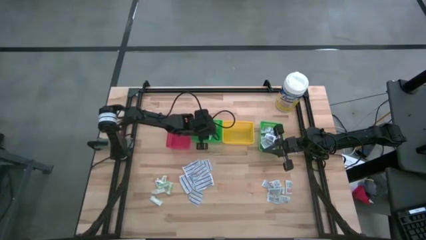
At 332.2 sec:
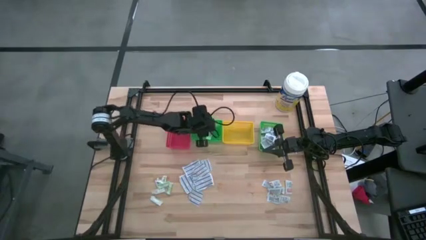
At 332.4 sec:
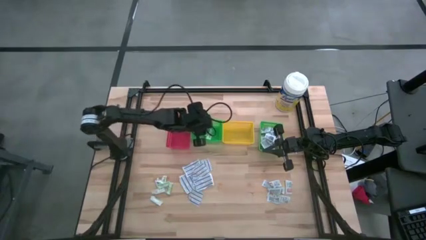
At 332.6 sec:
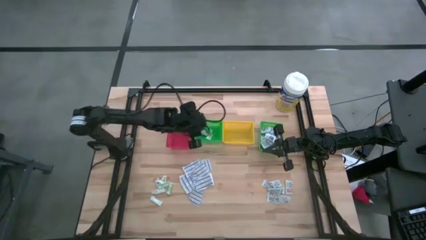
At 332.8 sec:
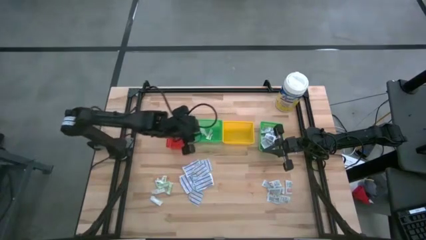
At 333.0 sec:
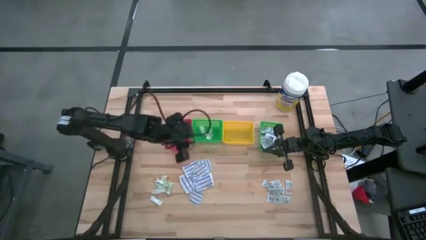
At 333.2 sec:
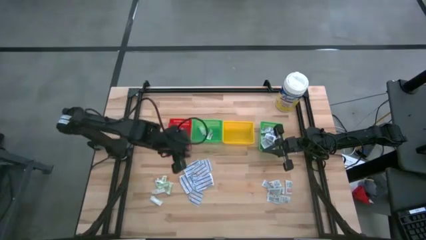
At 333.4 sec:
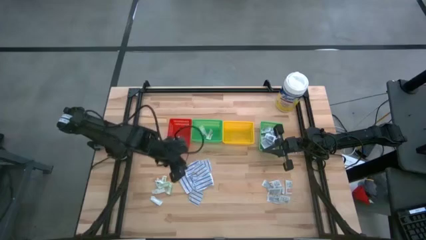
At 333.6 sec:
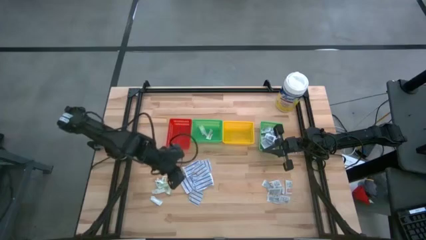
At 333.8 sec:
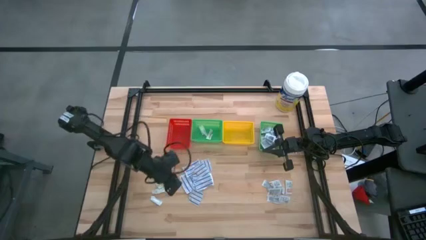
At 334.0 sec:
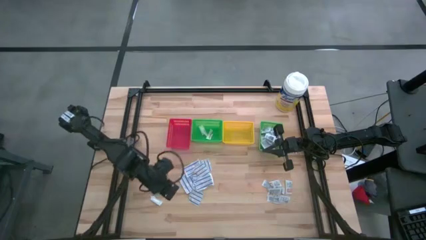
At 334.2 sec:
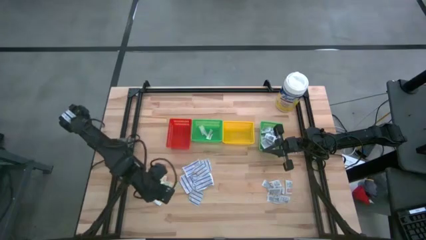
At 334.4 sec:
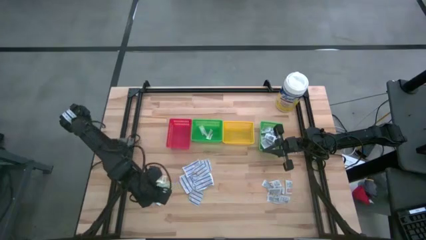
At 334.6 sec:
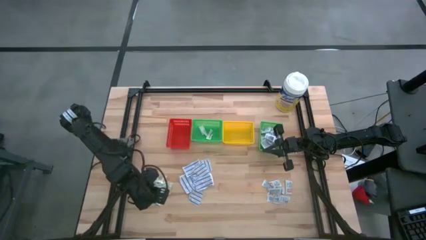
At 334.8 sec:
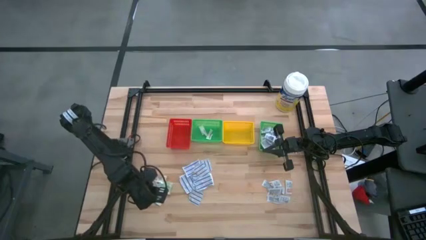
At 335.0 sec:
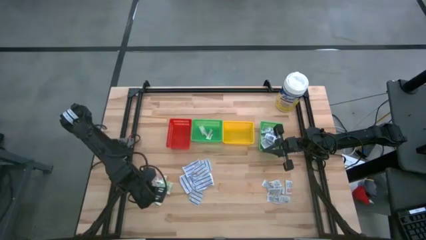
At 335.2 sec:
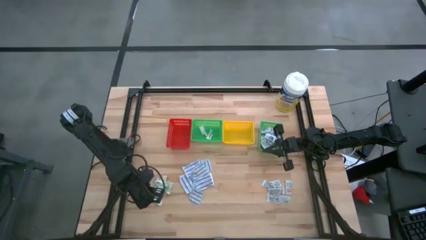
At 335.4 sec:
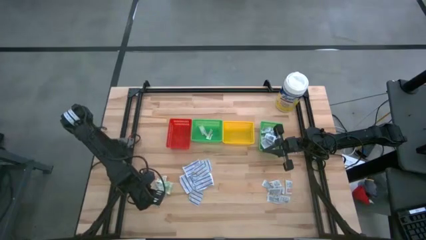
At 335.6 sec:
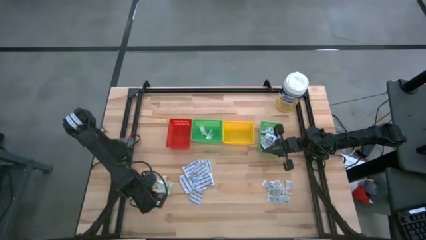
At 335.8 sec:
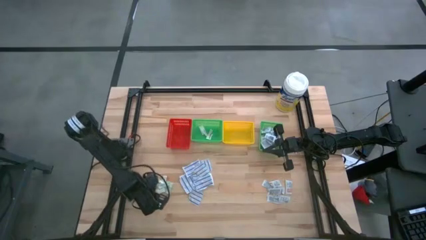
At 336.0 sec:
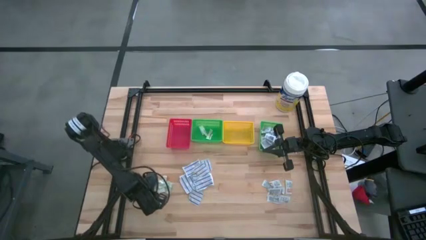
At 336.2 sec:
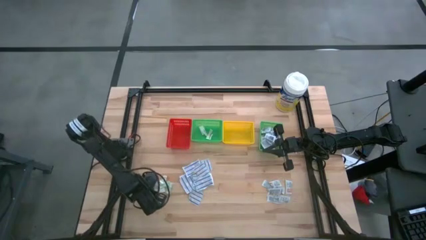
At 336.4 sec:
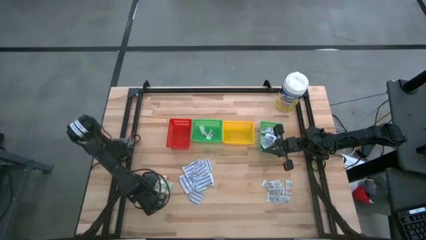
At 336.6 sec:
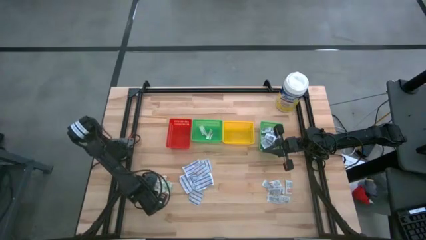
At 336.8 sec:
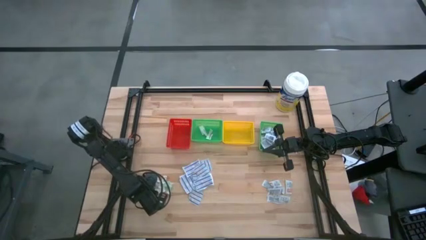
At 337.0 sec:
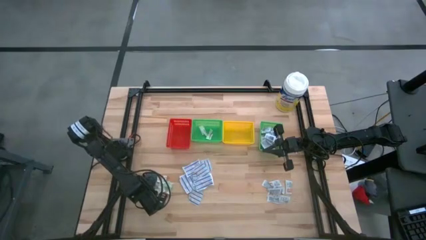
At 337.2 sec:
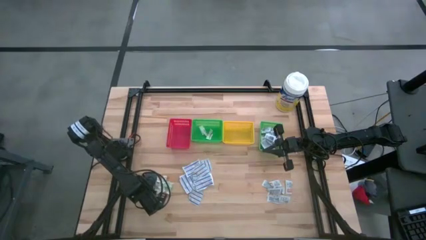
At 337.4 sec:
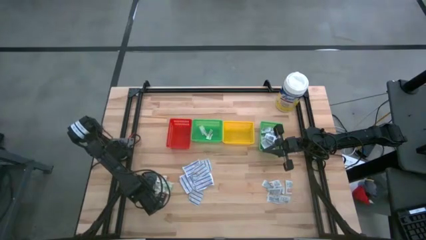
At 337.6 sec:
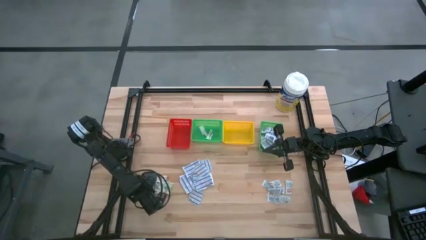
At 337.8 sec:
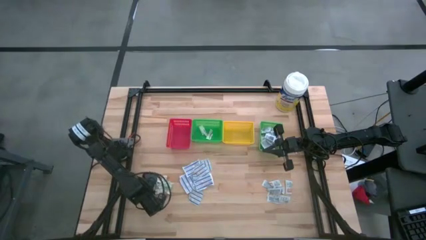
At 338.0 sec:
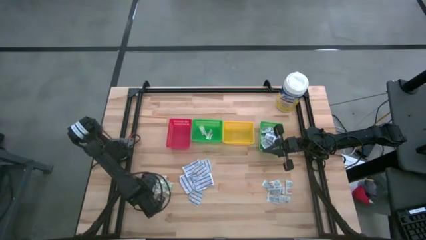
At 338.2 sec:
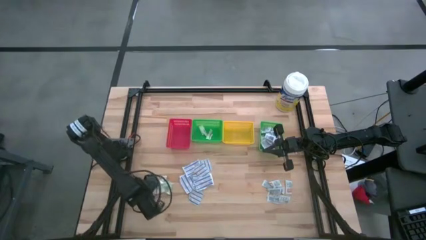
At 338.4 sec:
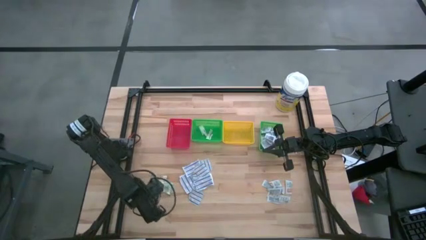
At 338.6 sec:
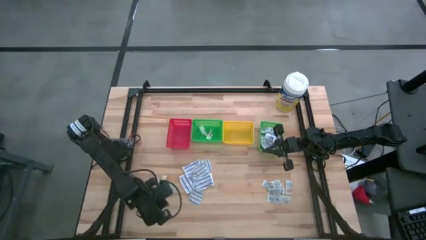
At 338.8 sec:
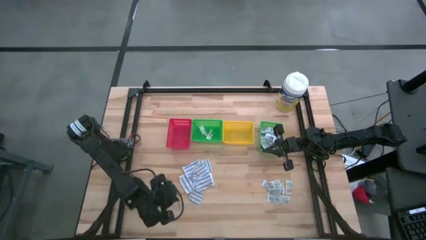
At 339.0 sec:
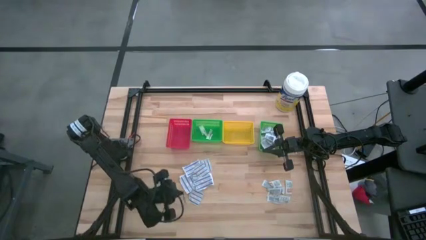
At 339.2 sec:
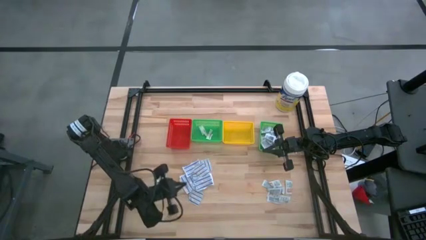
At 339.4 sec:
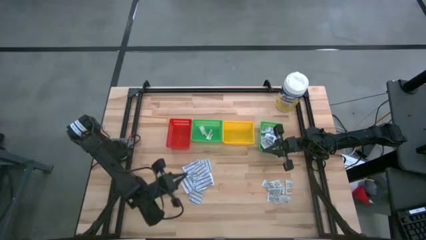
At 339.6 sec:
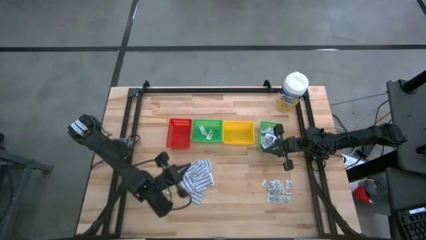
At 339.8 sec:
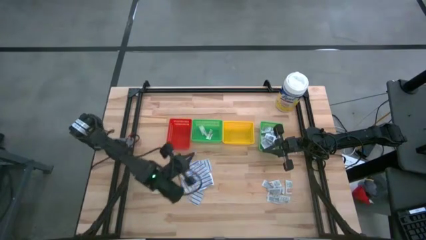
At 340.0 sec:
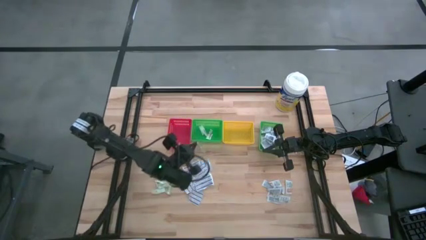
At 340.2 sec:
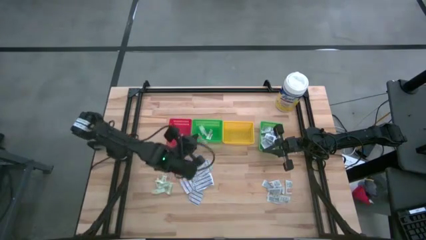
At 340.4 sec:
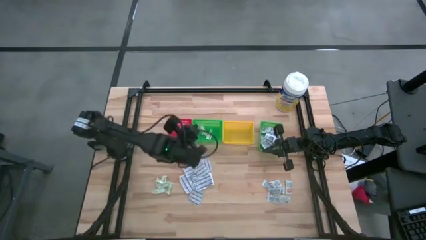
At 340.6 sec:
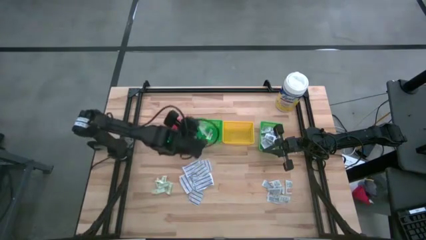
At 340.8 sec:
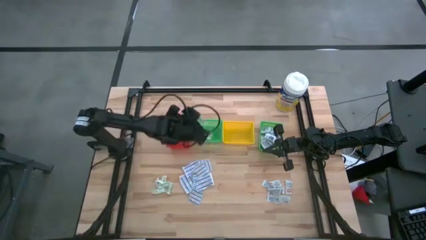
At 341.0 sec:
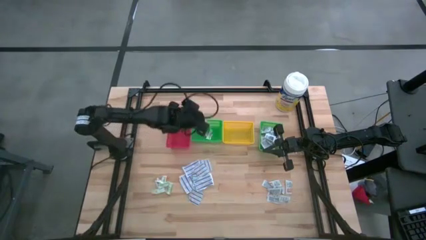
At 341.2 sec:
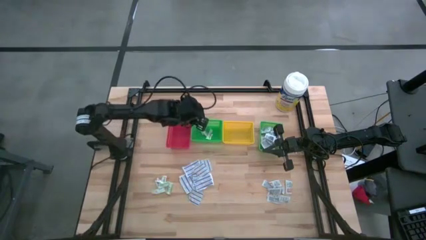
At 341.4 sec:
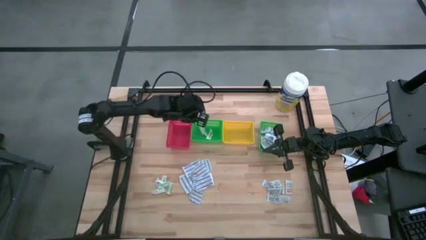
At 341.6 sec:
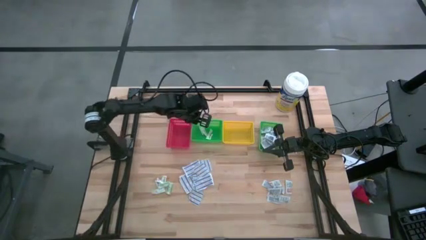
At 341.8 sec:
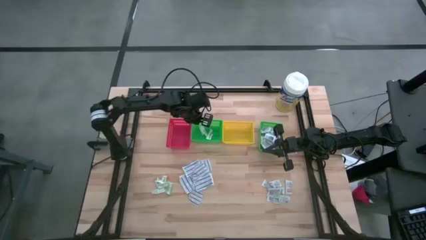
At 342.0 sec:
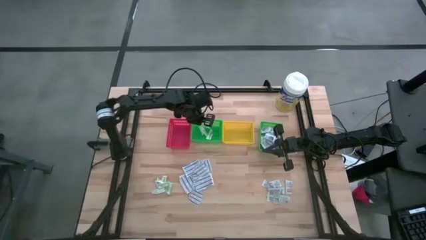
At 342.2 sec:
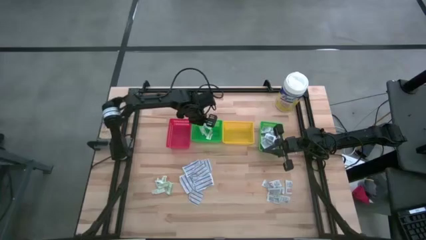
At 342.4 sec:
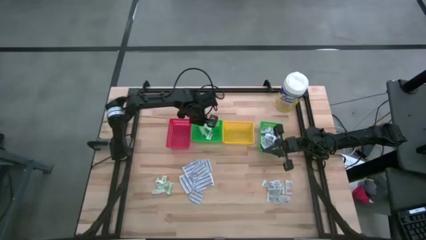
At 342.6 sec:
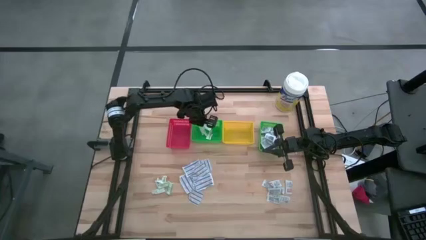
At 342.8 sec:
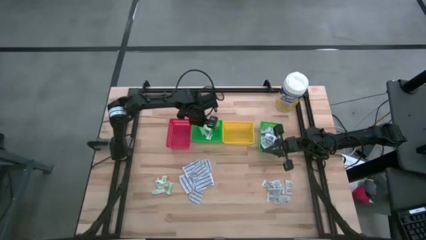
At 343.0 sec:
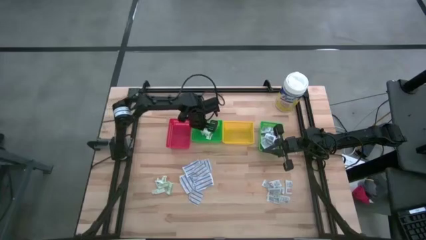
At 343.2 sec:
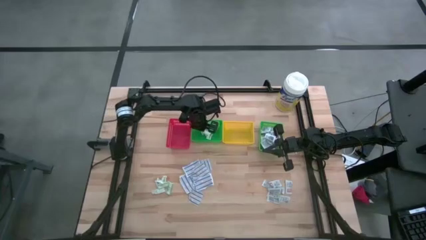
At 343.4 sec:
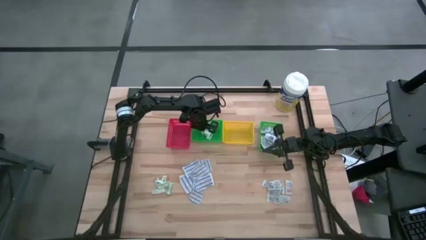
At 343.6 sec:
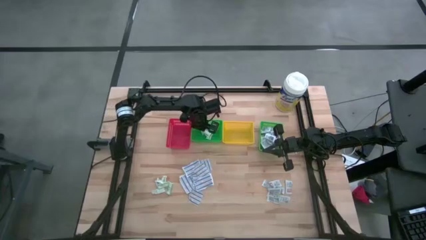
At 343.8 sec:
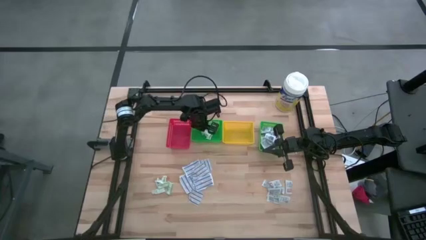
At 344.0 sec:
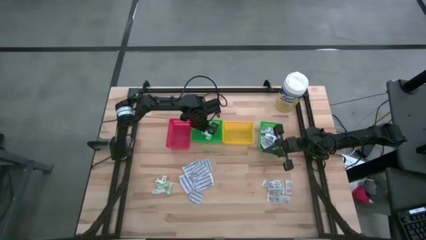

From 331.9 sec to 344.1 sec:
Task: Pick & Place First Aid Supplies
Put the green bandage into the left green bin

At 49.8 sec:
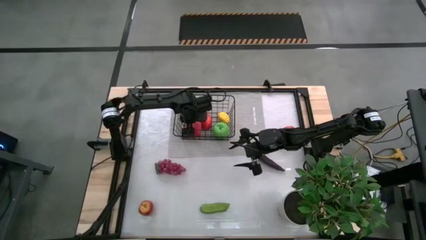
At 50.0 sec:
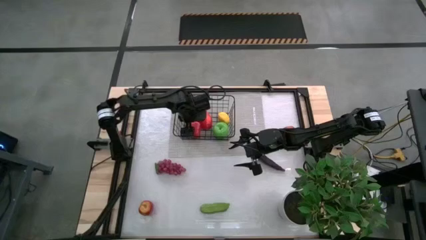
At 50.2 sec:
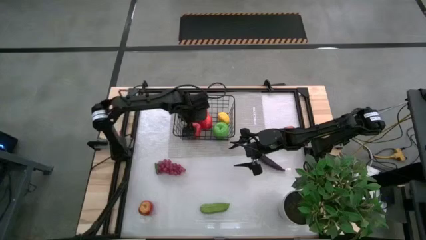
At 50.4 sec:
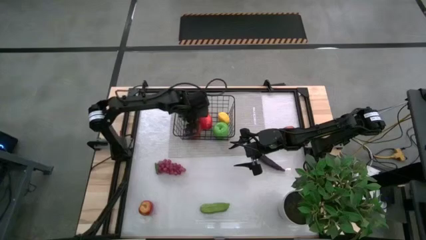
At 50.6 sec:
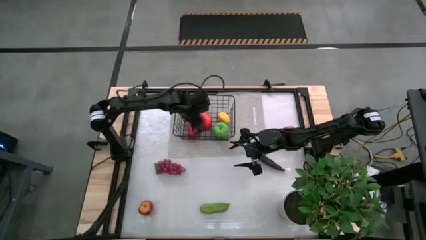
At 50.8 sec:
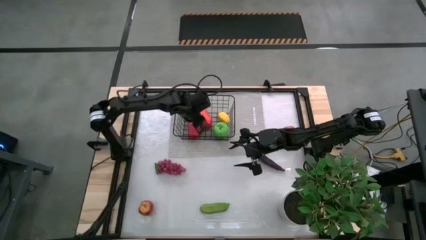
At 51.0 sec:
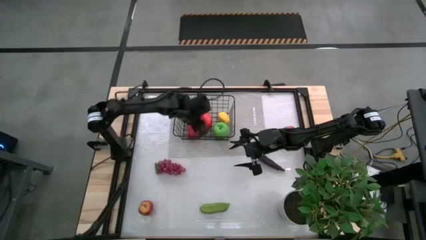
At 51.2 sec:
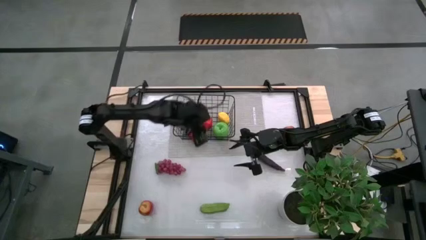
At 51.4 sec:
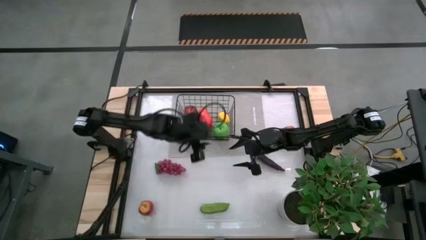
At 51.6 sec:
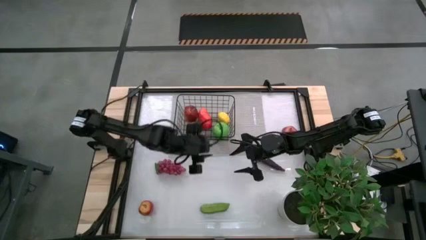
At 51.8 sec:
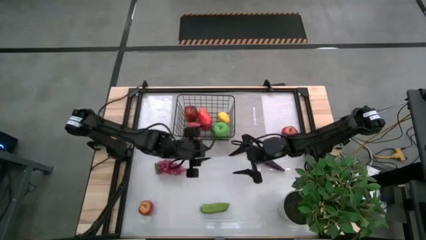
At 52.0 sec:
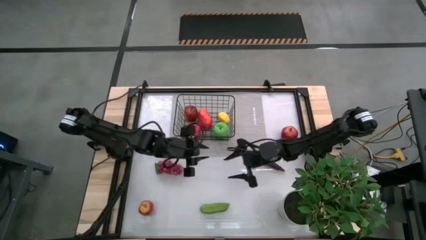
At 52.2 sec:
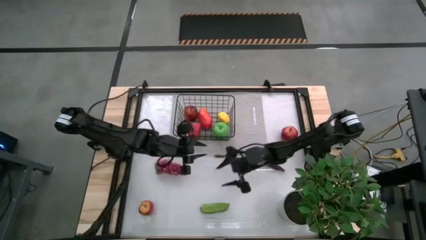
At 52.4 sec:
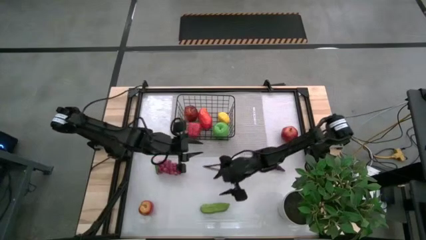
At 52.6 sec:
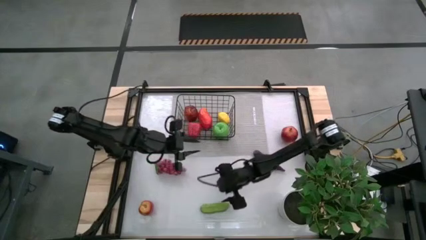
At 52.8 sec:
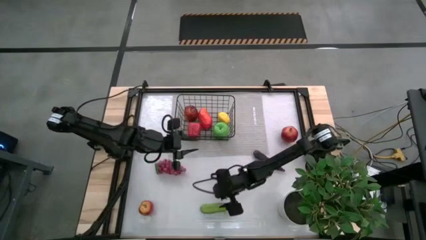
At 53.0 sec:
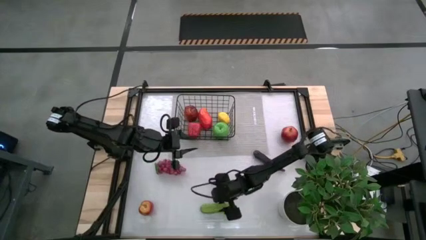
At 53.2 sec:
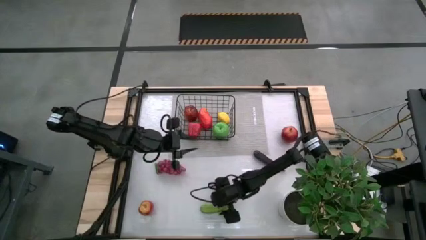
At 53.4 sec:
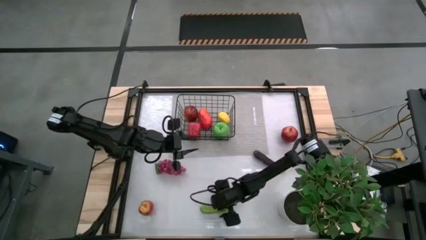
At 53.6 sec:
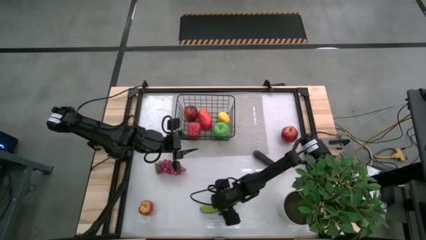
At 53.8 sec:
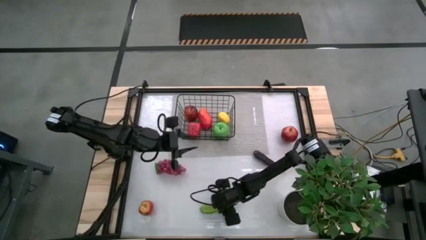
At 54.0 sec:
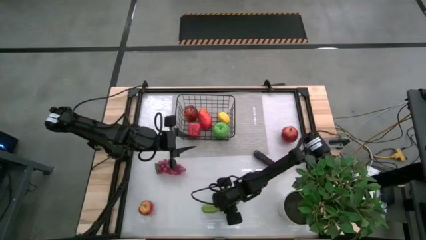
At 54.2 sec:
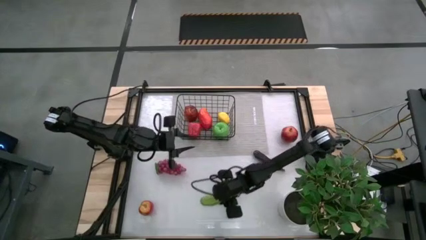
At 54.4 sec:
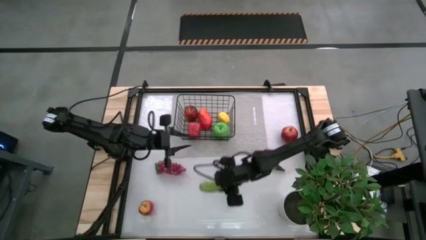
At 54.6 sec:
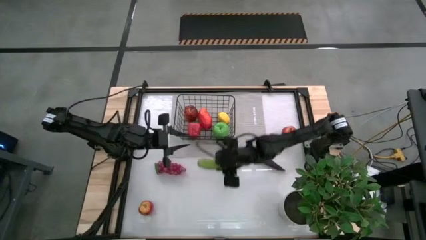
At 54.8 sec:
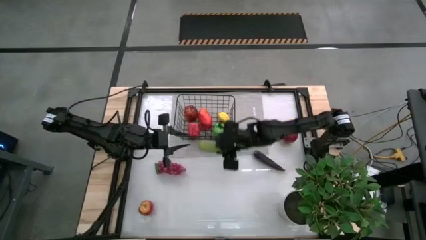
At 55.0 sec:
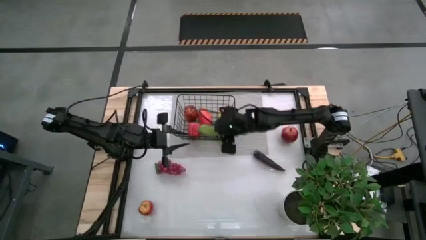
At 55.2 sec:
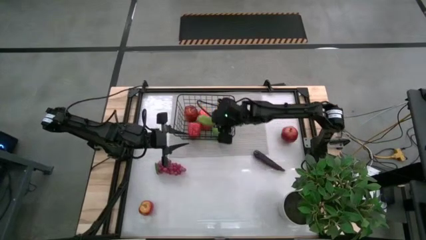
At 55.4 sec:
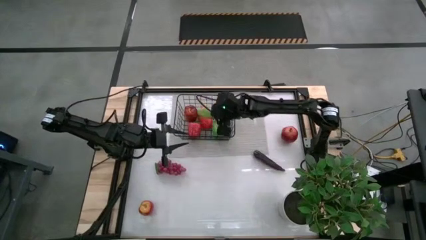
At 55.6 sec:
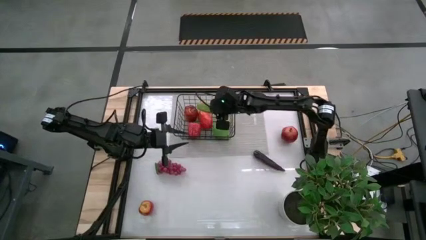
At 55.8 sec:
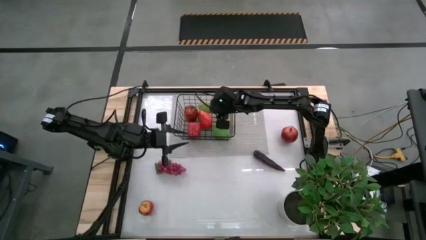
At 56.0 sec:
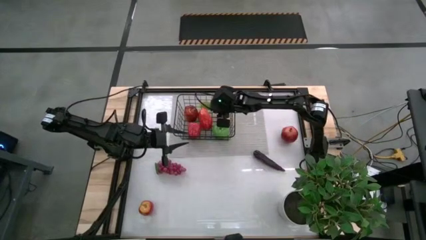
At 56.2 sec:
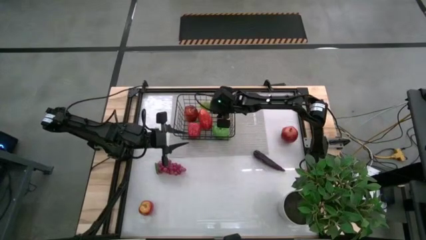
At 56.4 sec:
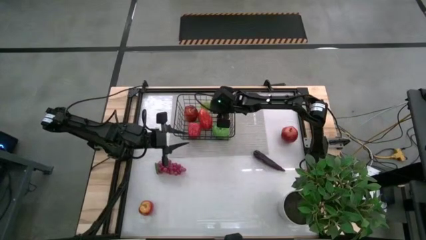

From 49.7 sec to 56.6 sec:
Task: Build produce basket
Put the cucumber into the wire basket
